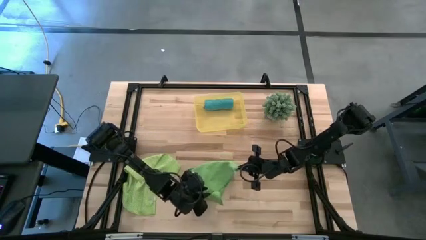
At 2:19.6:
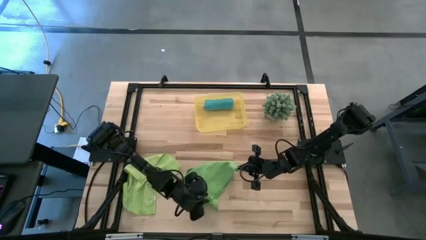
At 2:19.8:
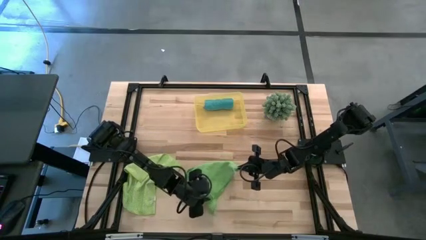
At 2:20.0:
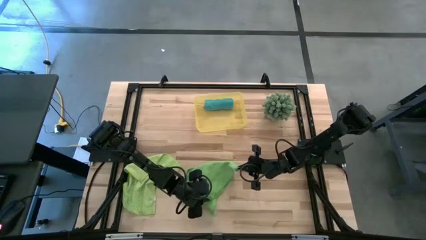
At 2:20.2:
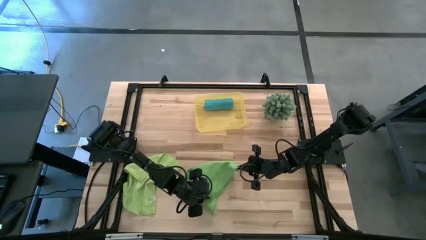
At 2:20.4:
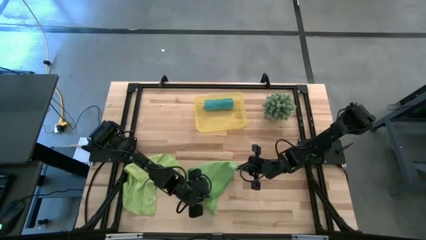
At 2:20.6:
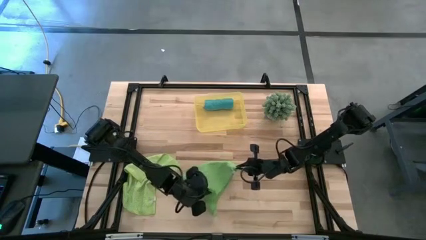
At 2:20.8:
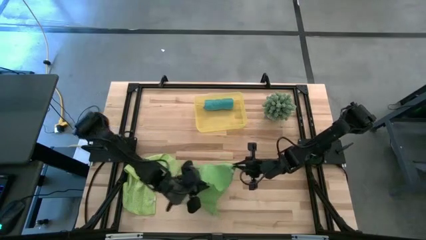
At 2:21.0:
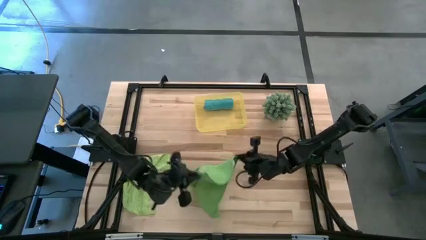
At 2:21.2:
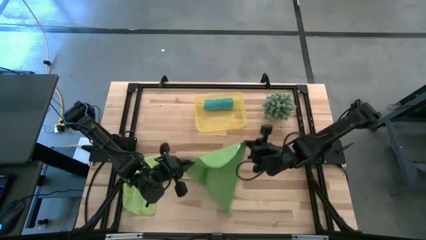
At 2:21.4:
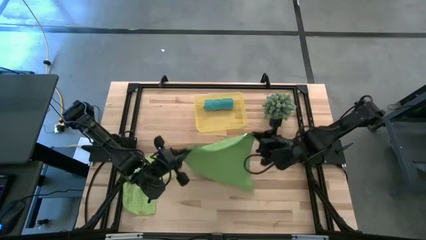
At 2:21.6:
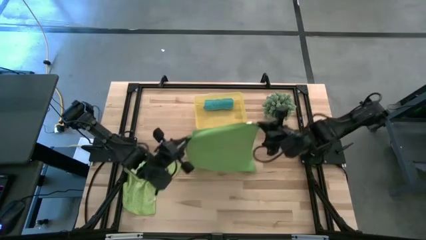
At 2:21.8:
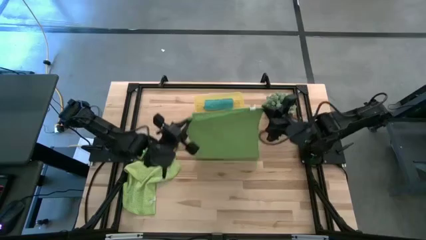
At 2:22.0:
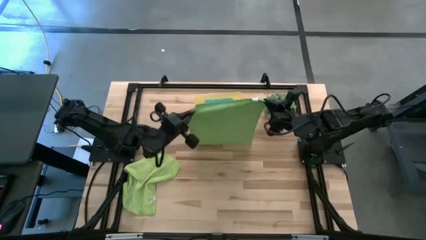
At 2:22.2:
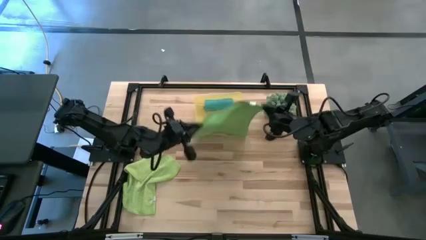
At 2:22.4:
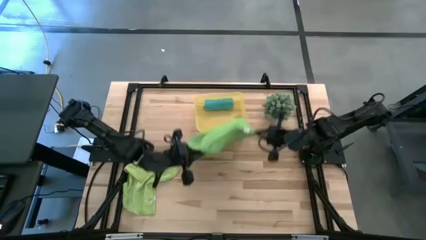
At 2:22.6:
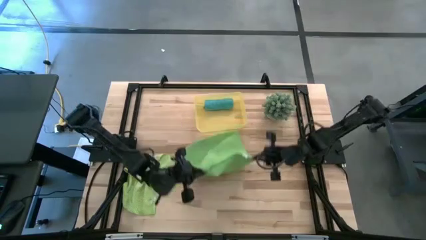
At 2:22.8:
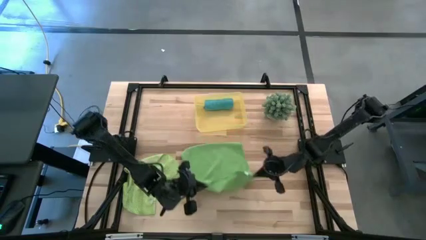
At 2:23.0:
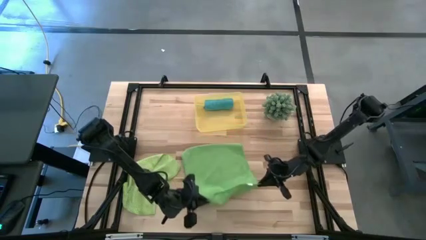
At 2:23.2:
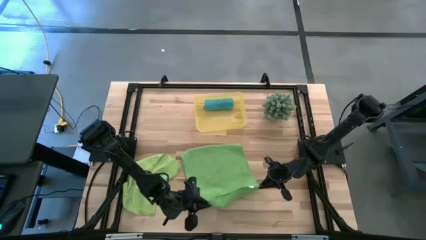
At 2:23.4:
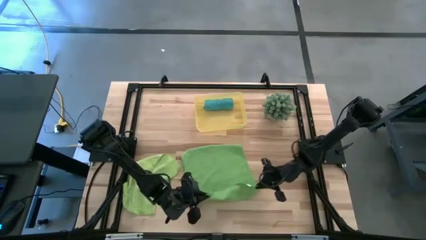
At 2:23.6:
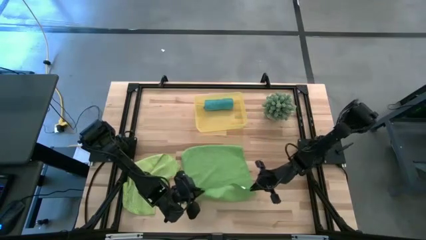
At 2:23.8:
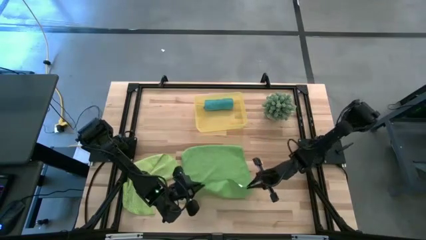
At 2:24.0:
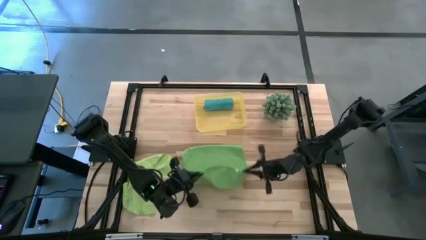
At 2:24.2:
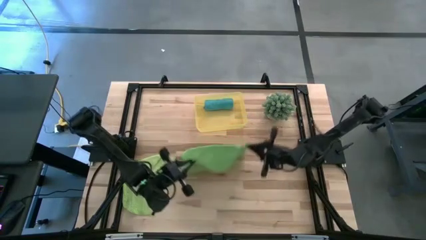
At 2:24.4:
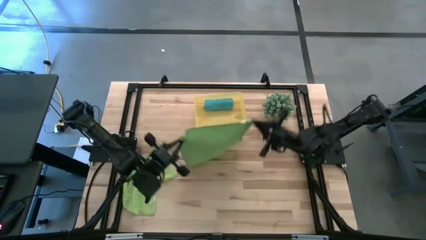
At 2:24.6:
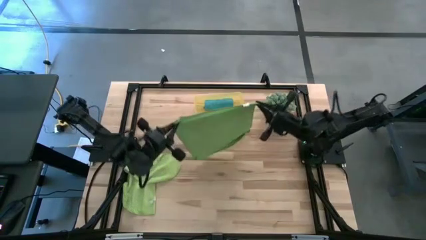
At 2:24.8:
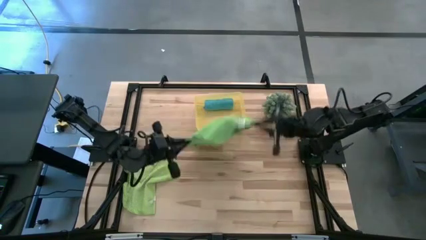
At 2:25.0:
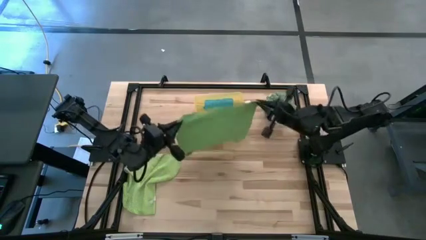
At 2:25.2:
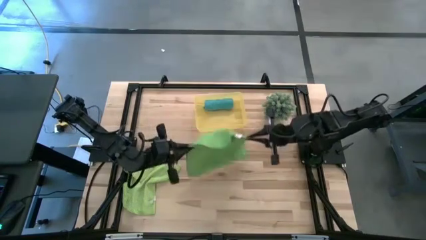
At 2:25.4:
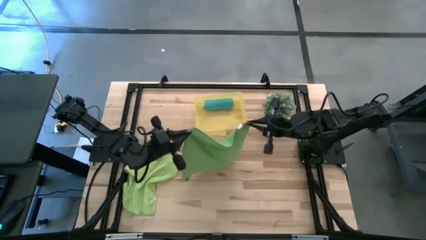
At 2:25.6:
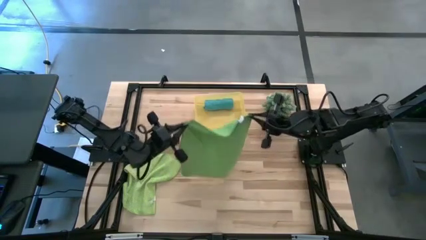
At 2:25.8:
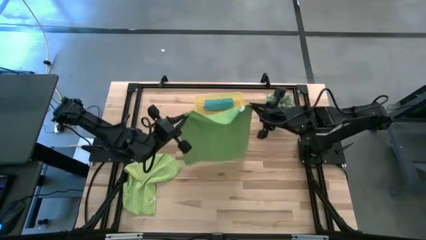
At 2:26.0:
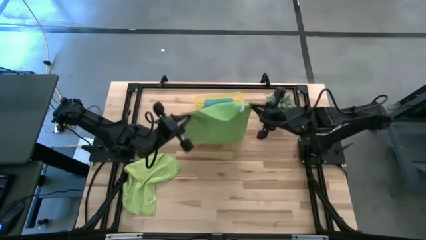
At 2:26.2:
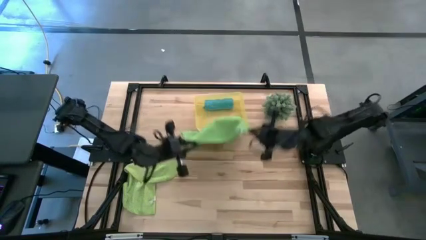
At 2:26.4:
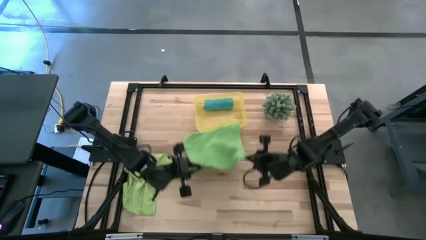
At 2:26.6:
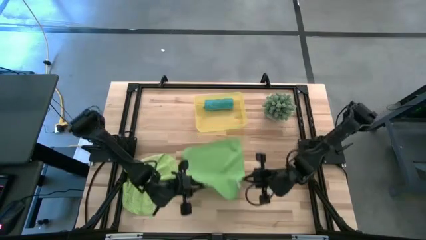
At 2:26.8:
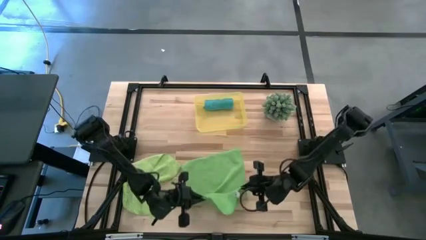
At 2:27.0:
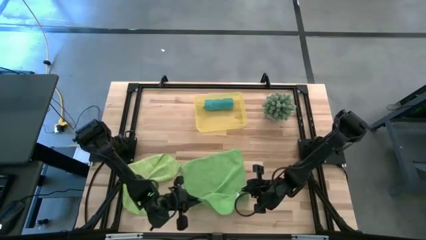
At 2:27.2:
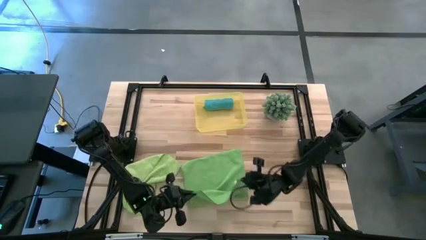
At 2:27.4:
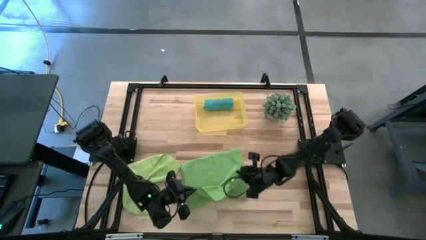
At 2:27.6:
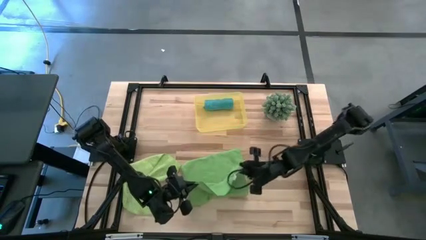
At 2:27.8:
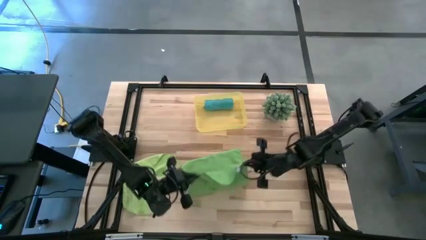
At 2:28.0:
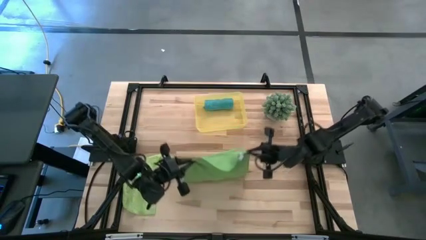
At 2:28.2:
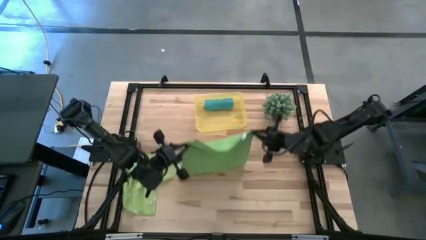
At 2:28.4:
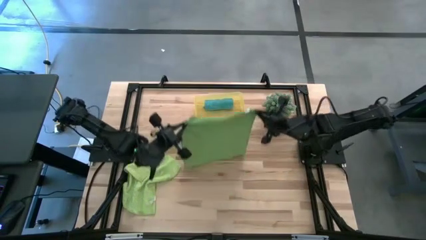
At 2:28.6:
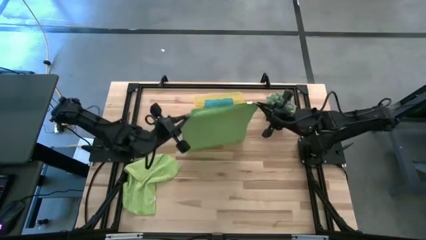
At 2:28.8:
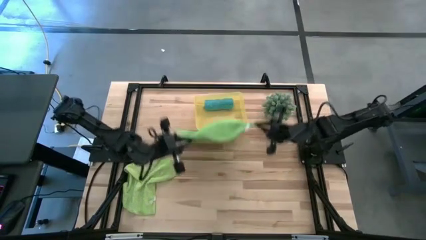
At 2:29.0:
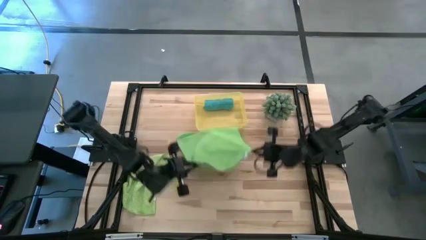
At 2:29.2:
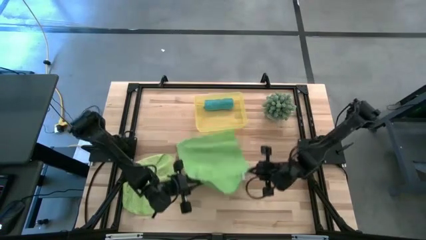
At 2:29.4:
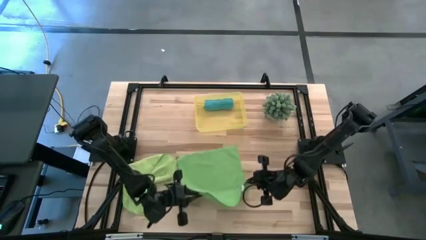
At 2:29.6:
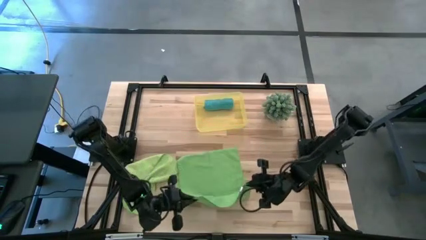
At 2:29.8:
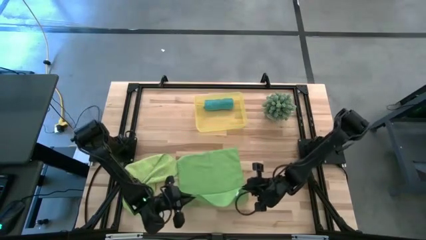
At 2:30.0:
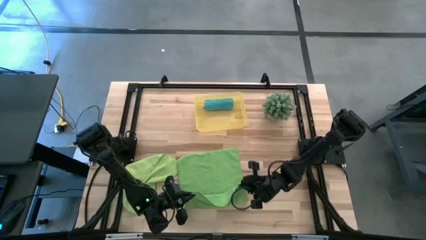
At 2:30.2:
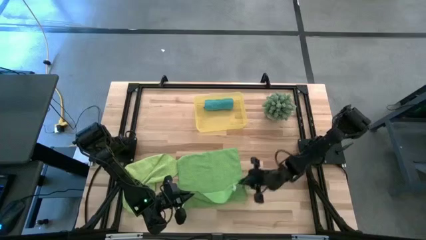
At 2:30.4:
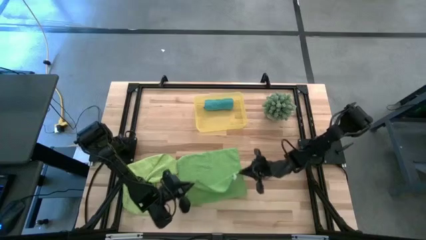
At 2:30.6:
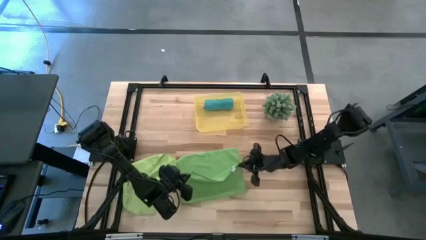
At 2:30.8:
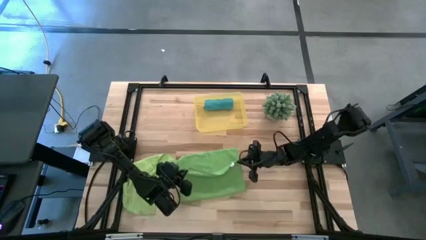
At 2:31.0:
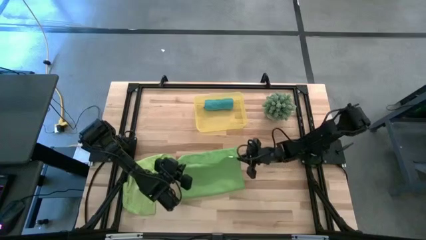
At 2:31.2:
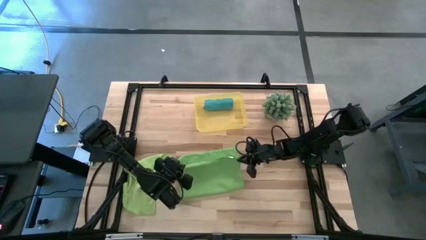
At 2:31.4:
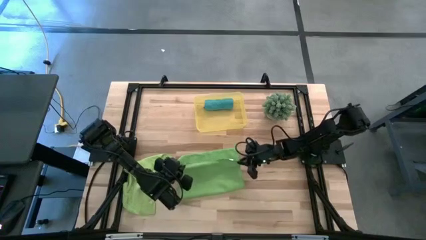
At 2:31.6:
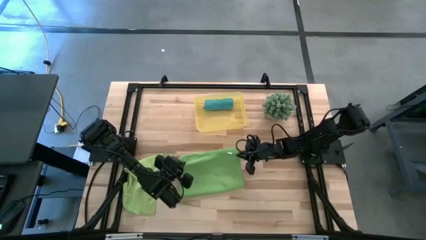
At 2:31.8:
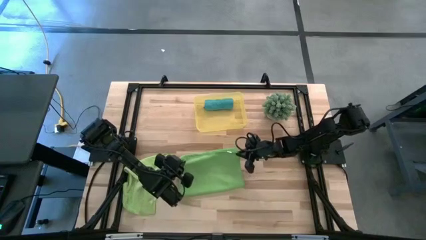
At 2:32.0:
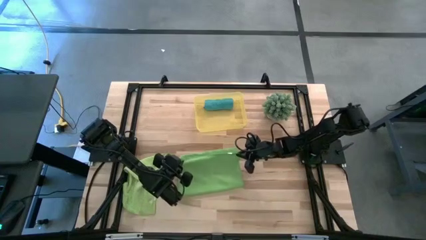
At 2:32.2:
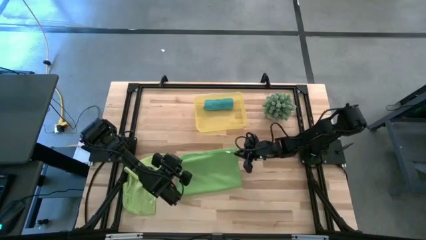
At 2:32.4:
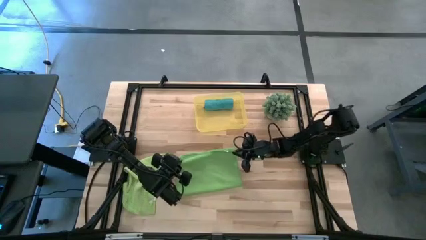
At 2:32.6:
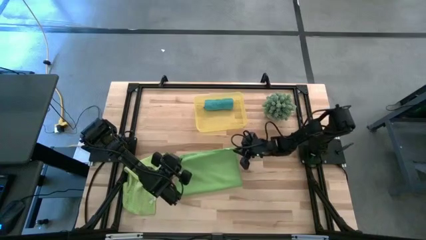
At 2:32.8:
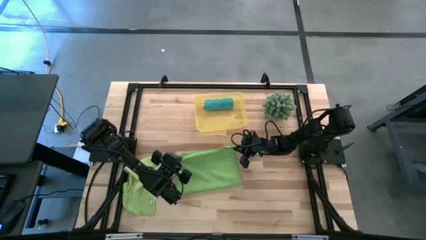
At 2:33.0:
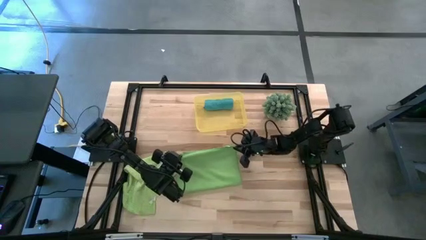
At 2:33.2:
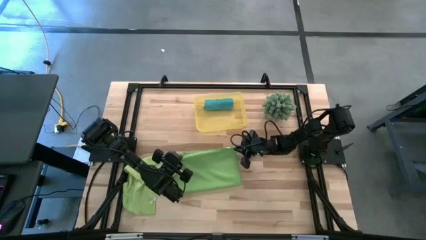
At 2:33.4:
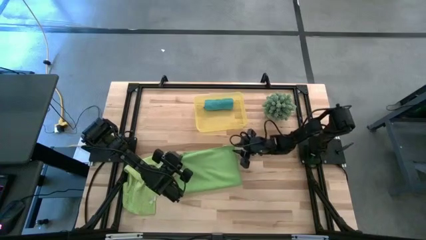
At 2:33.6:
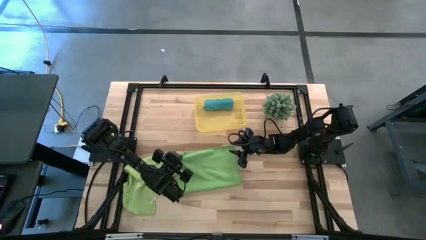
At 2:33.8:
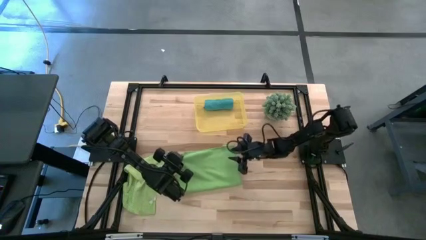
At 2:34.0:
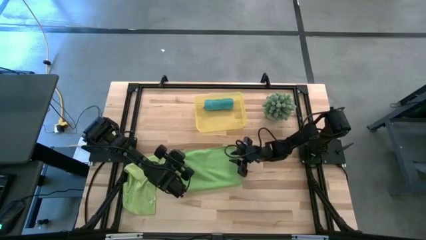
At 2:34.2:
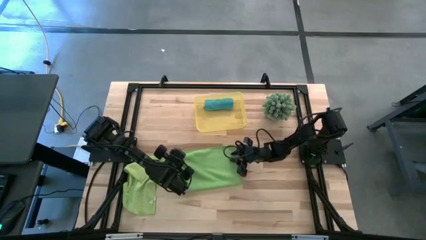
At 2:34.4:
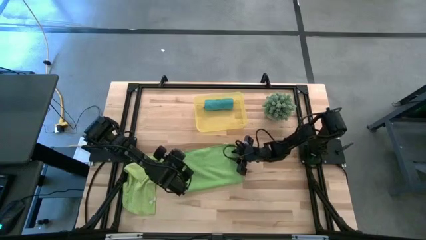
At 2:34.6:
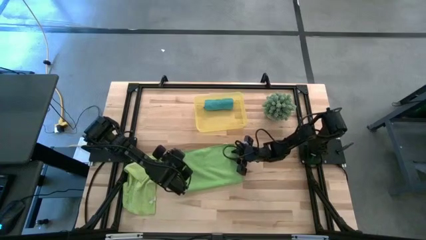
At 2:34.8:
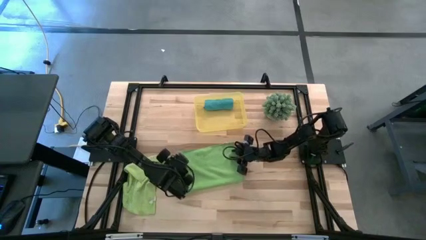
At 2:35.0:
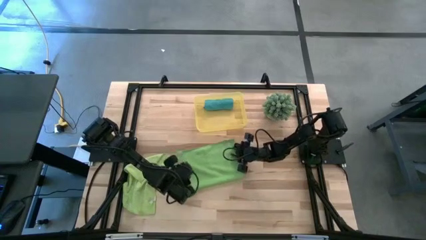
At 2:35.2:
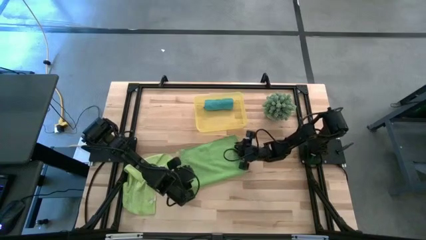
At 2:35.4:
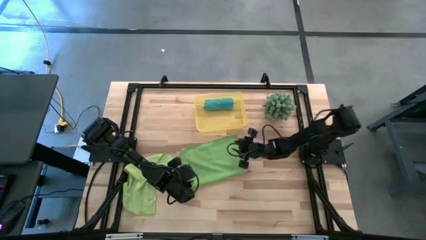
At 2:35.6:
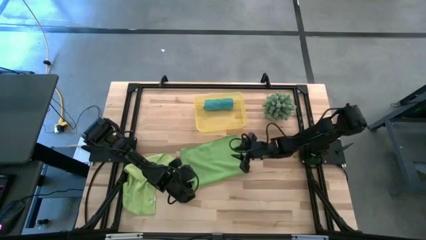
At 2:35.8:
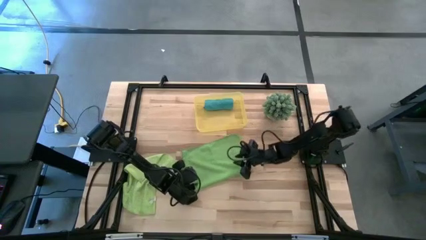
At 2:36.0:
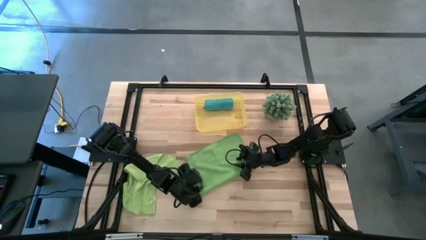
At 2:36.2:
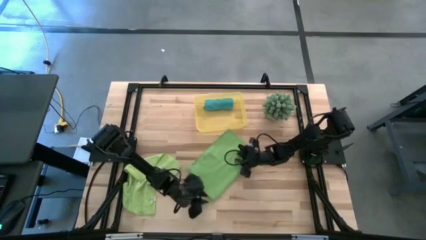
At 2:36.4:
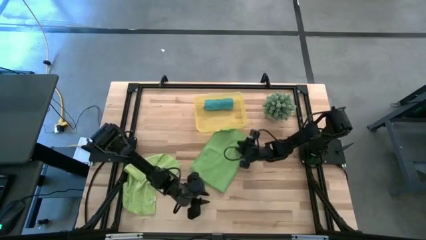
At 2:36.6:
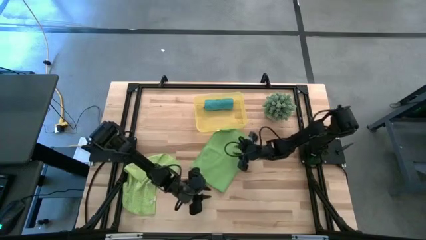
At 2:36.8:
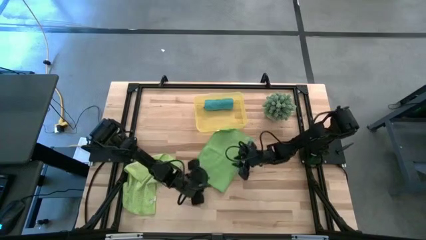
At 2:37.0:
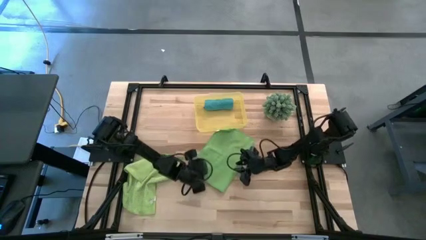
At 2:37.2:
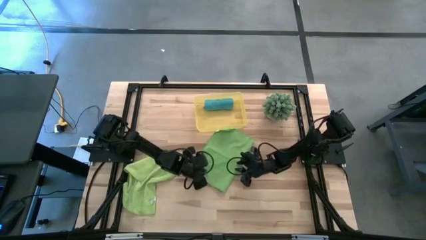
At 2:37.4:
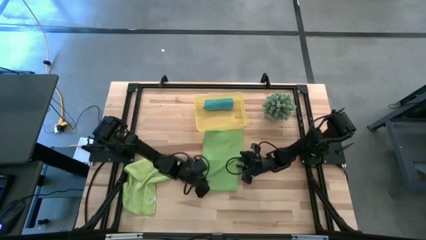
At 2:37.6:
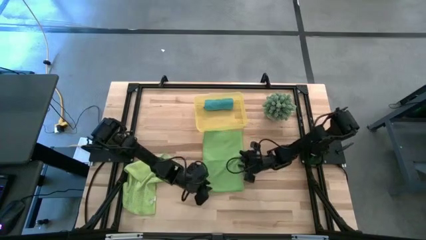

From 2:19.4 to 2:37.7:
Task: Roll microfiber towels into tight, uniform cylinder then place into a basket
Fold the green microfiber cloth
